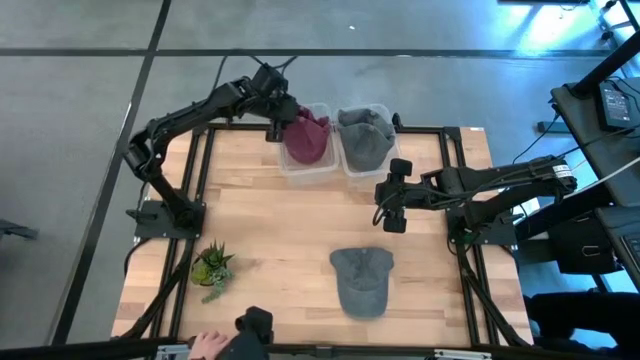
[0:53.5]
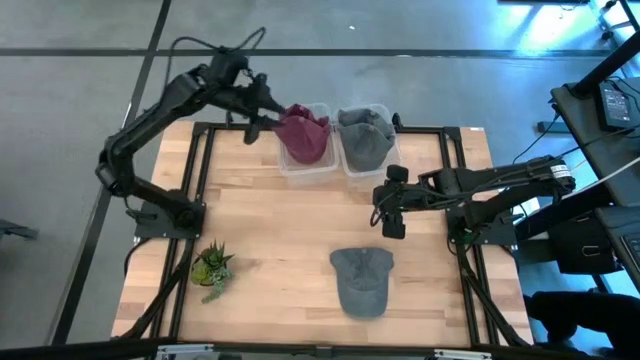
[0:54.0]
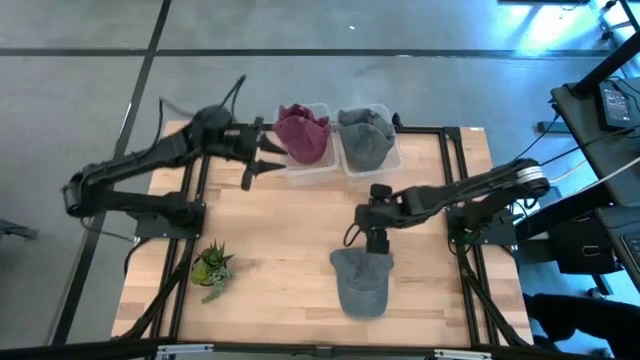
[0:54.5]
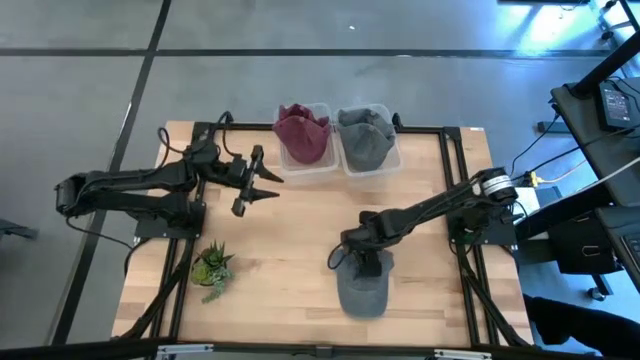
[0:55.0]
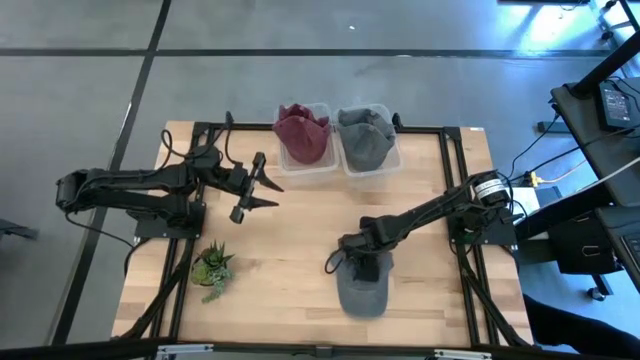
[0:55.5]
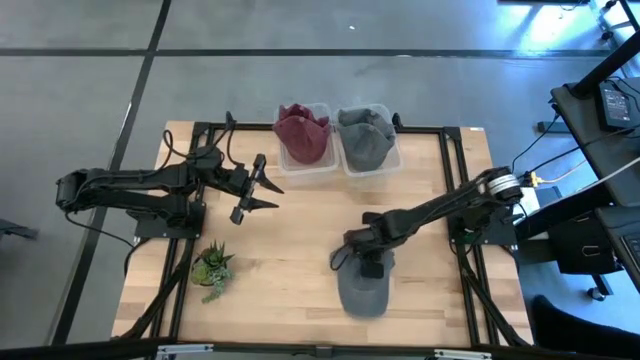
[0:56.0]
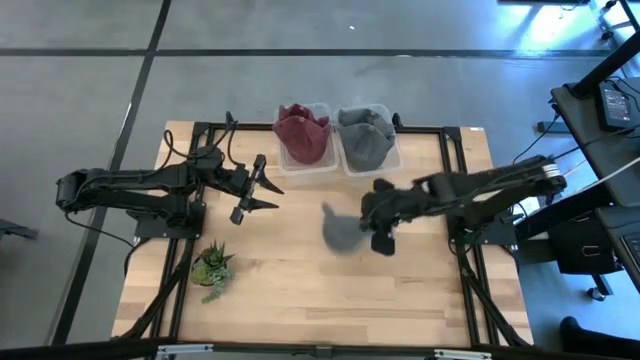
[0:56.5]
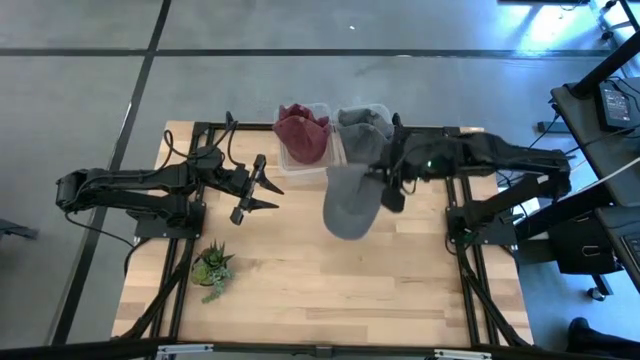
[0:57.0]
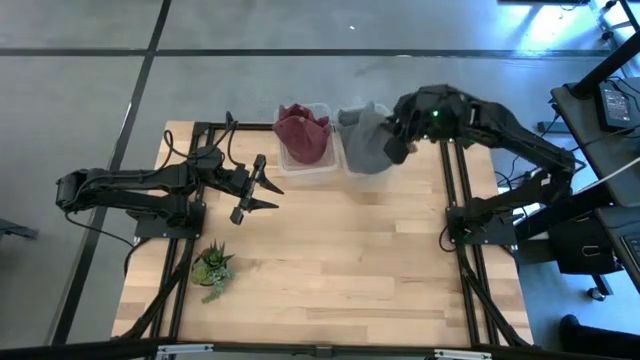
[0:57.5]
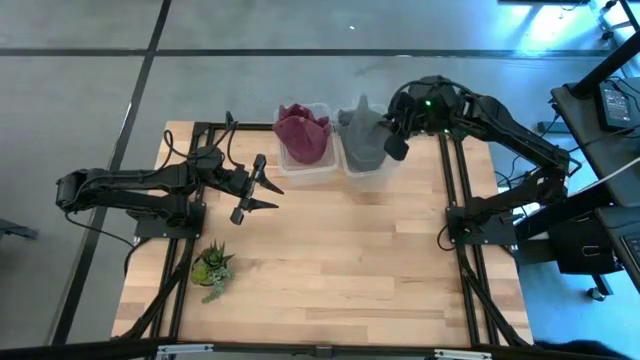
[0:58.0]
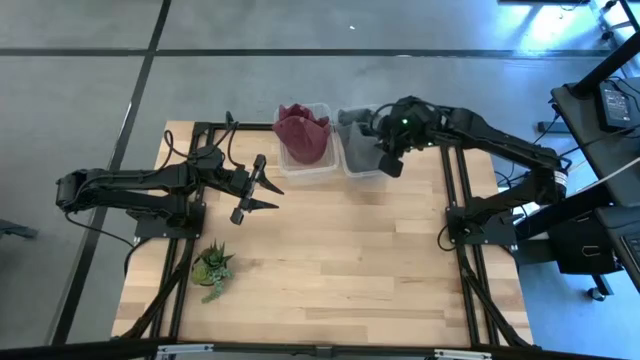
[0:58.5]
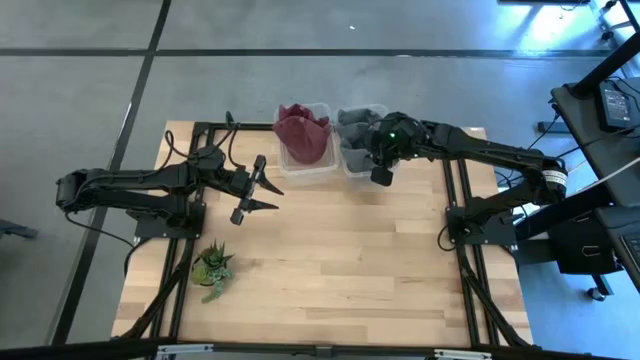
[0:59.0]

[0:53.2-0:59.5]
Task: Pick & Place hat
Put the black cap into the right transparent bin

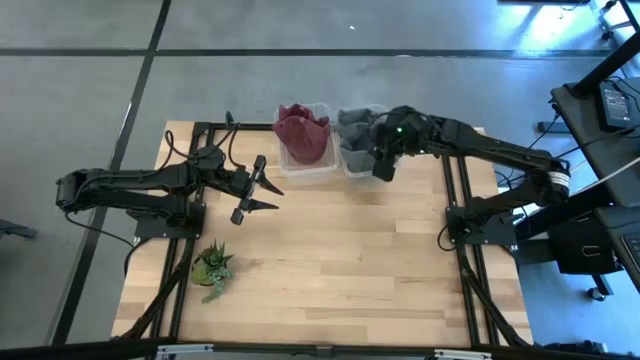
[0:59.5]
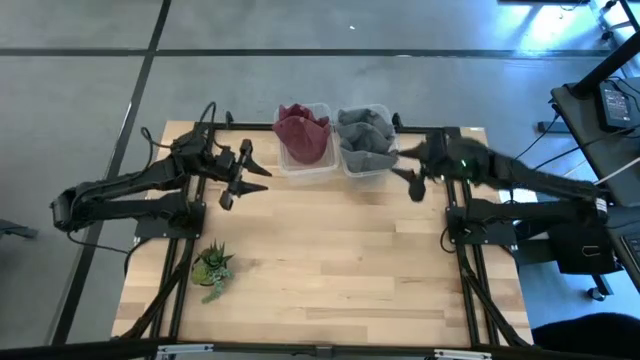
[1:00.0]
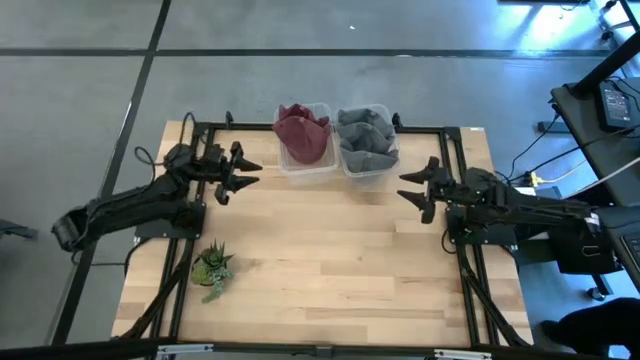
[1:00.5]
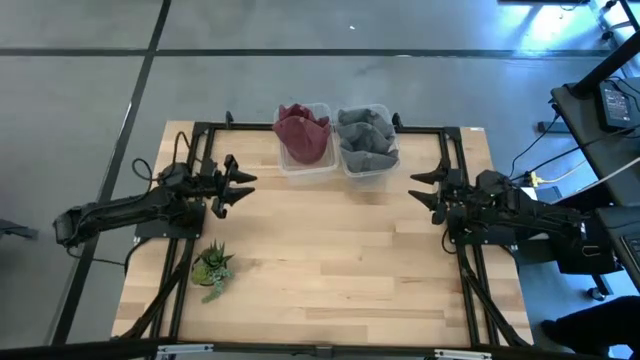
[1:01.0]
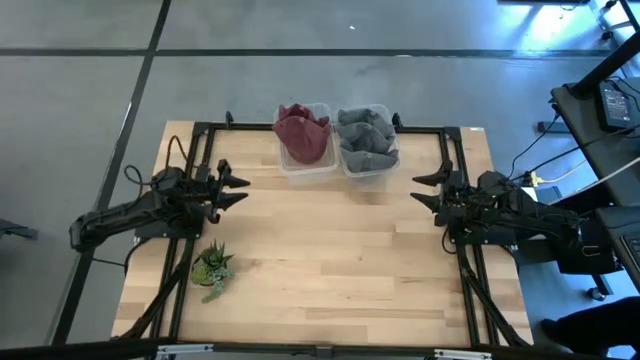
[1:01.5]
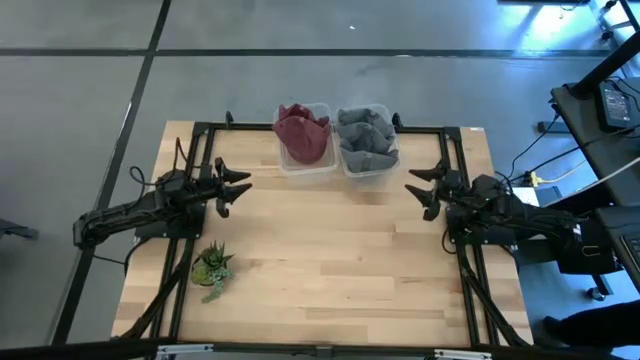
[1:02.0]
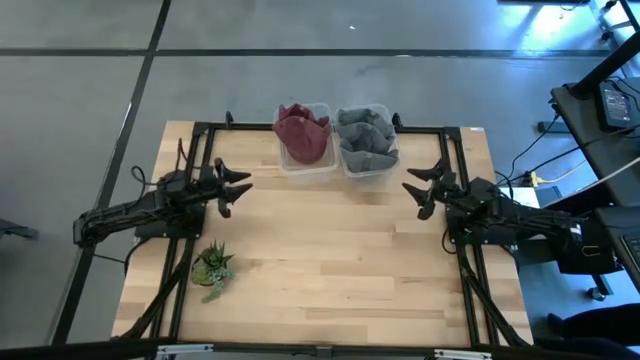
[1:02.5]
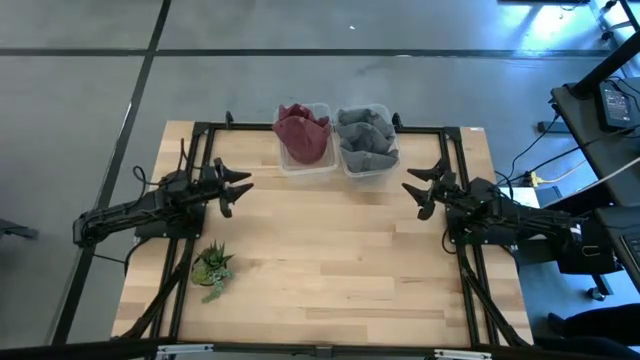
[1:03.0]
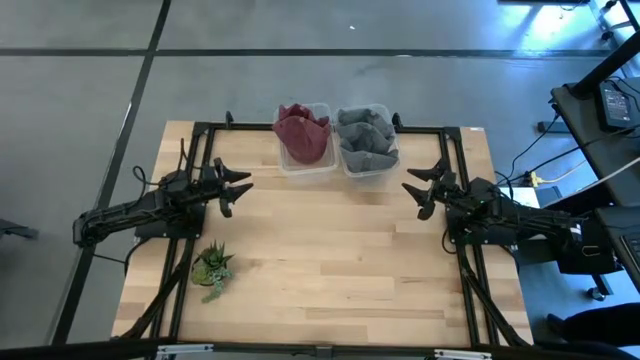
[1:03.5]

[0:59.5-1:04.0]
Return to Home Position

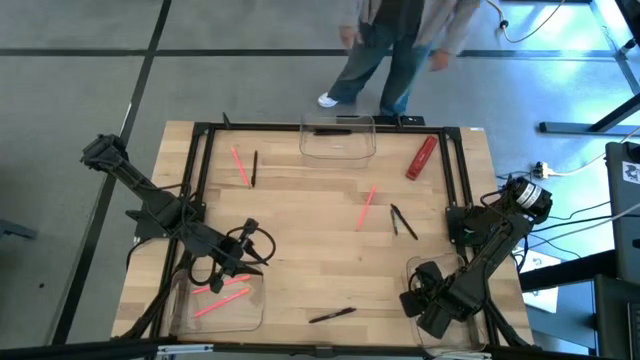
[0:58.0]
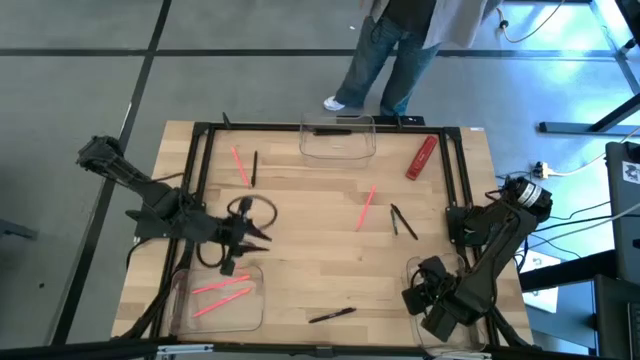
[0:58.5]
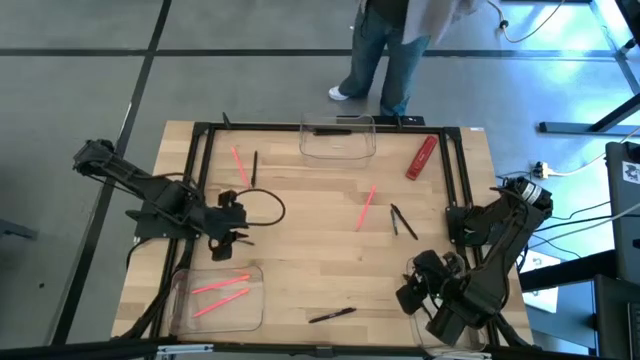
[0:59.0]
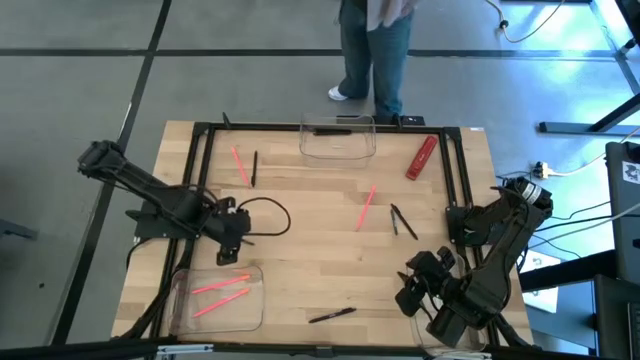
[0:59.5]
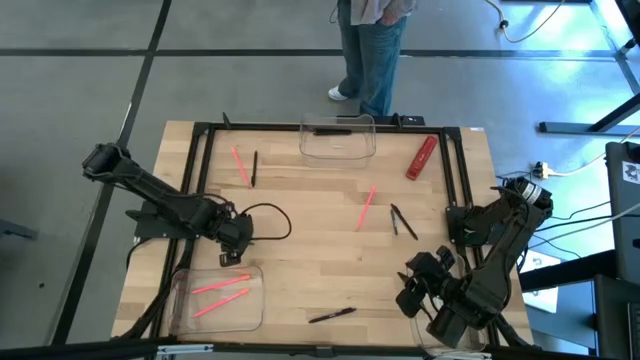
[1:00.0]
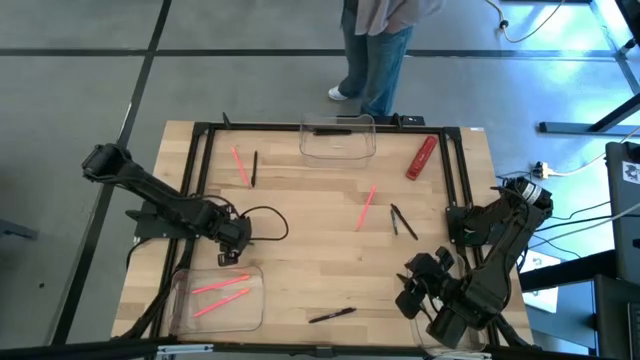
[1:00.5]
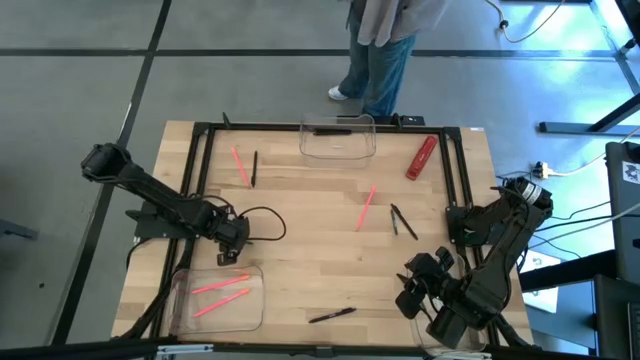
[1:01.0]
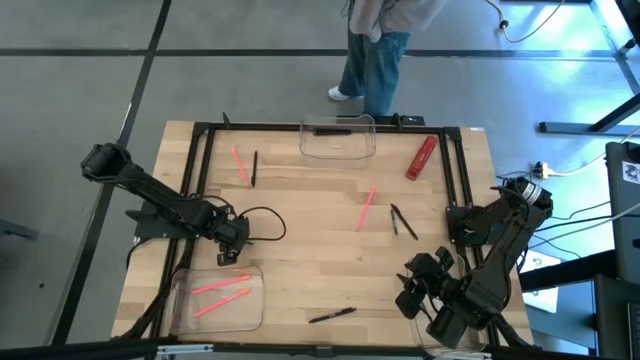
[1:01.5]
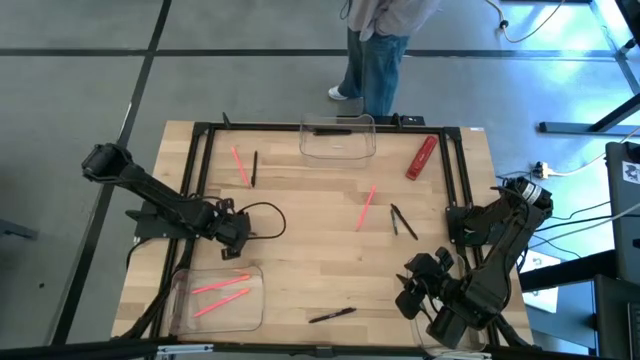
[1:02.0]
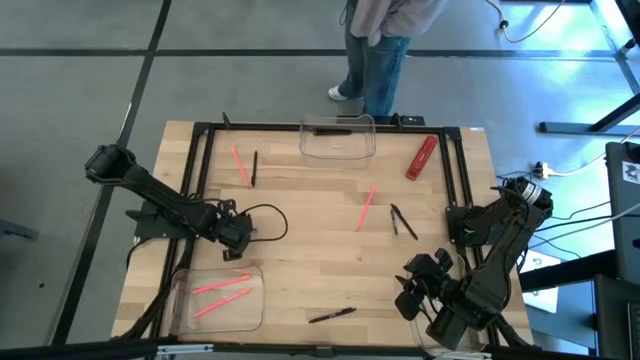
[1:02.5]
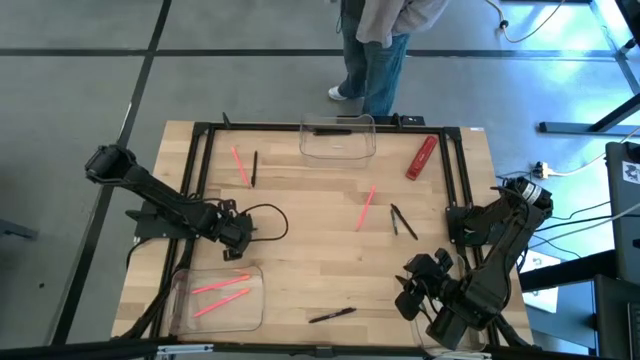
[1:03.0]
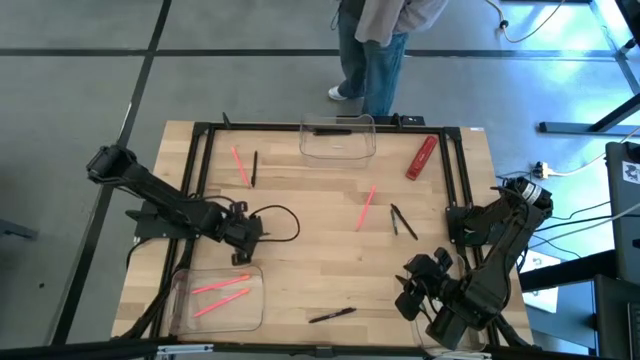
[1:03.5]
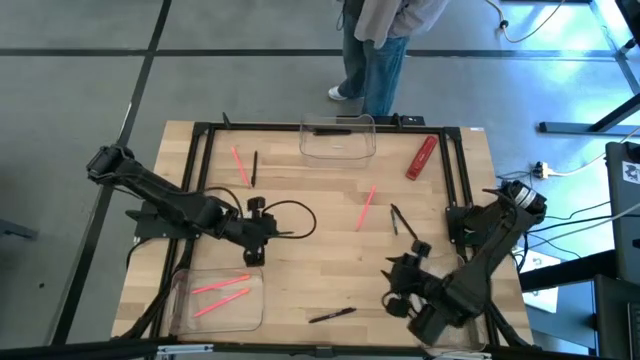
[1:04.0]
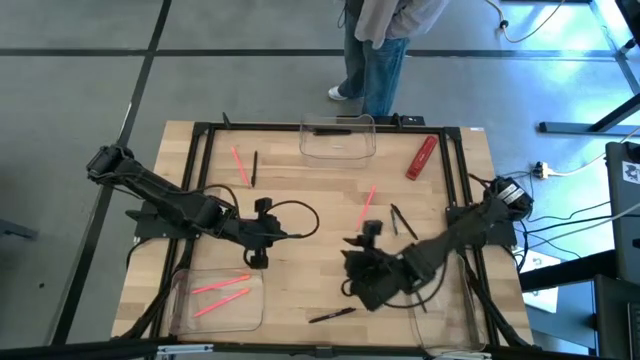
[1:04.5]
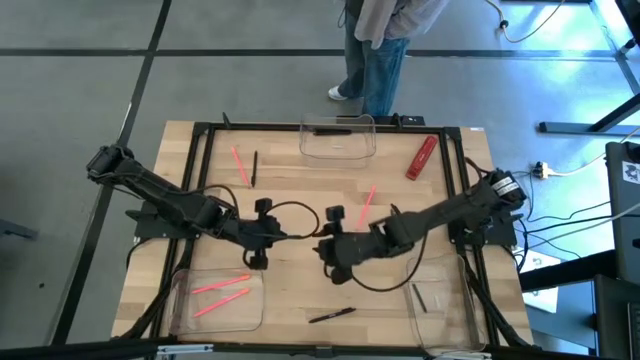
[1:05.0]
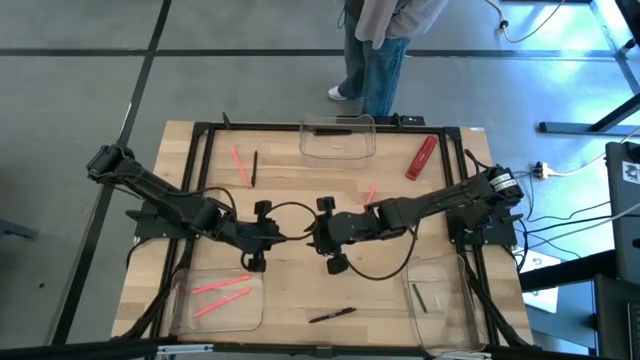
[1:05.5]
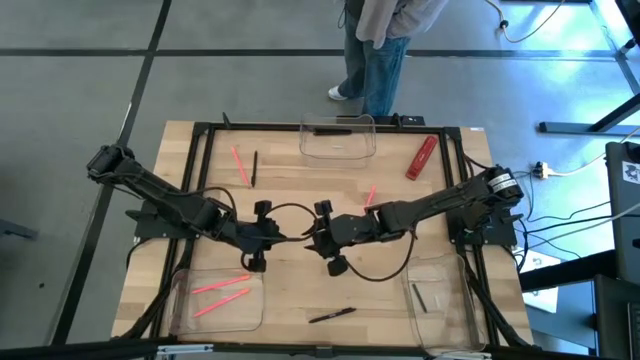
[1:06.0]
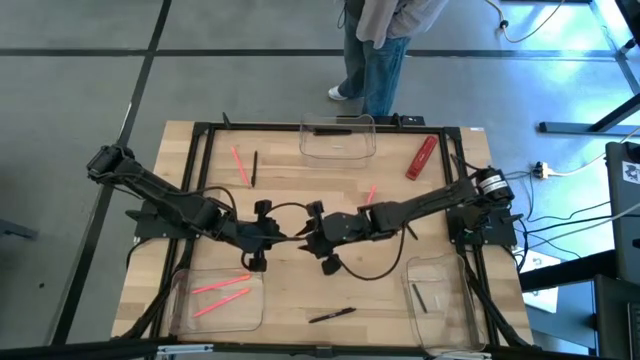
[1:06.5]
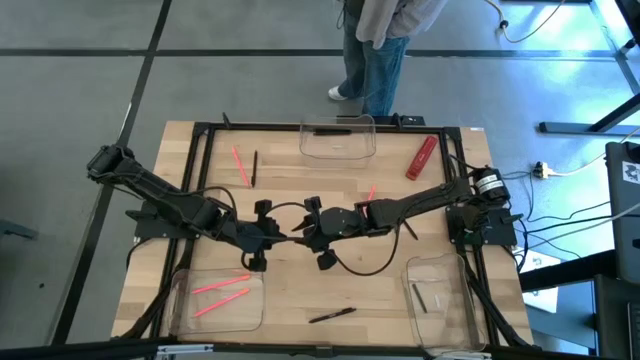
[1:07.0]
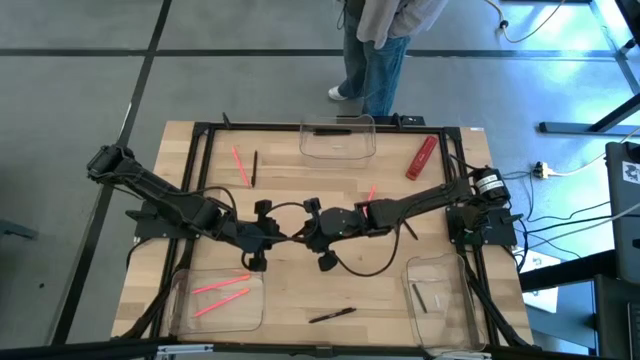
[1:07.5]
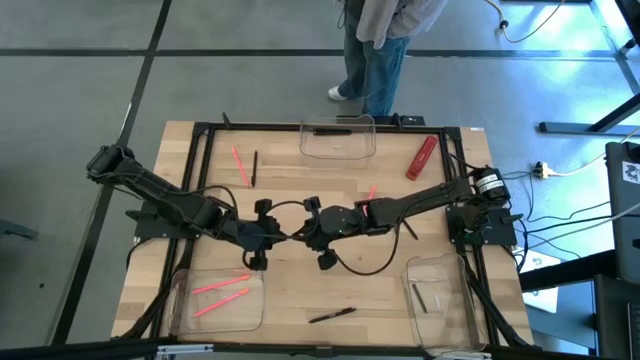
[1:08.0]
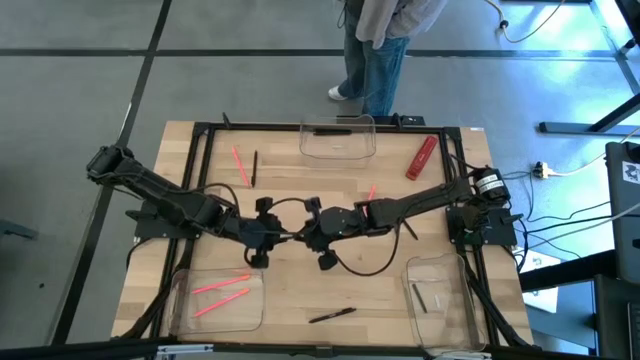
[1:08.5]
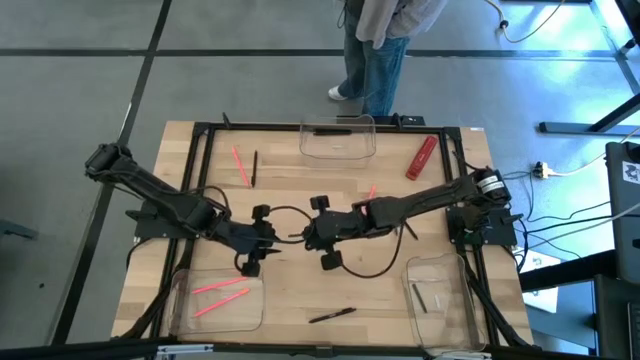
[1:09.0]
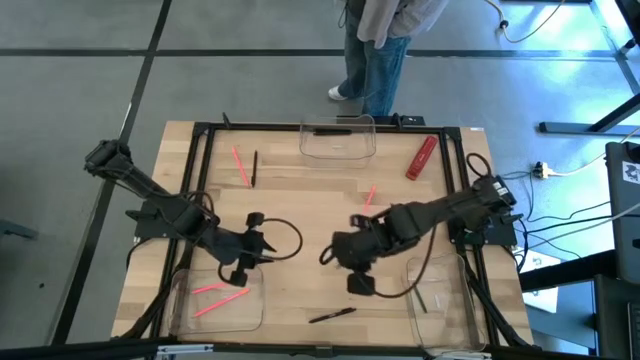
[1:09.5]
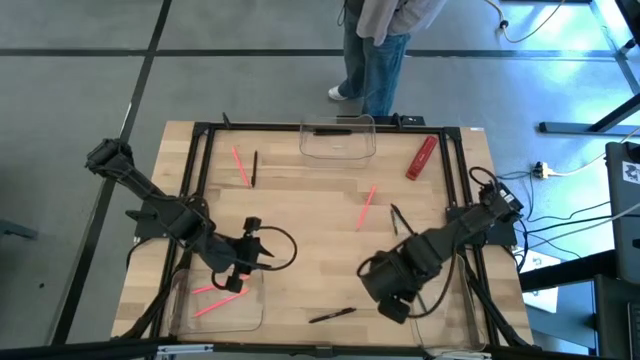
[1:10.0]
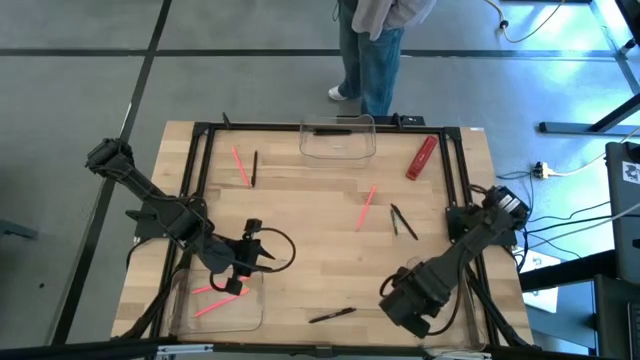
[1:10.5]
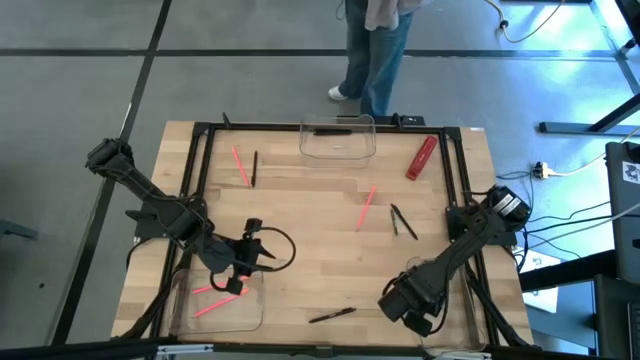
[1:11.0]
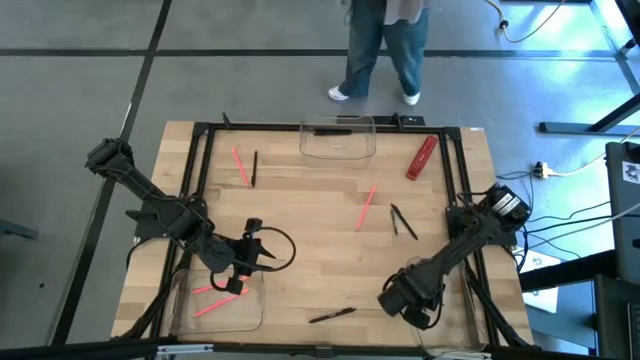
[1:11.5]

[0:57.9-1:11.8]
Task: Sort crayons/erasers/pens/pencils in bins
Put the green crayon into the bottom right transparent bin
